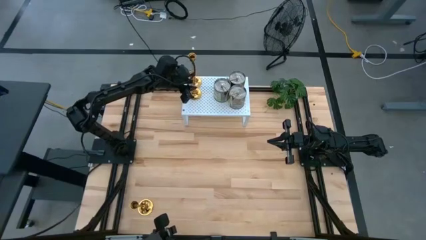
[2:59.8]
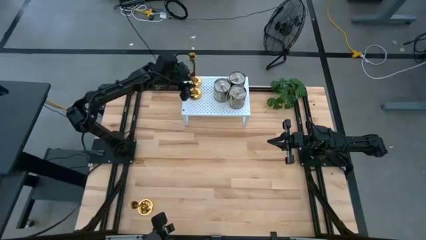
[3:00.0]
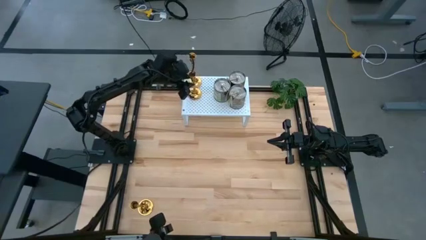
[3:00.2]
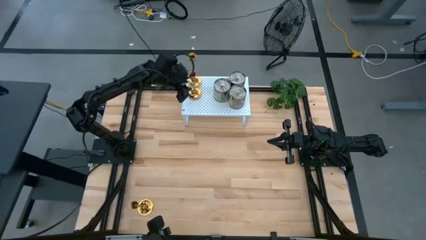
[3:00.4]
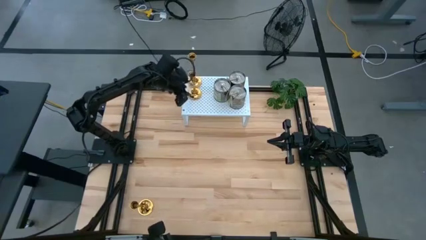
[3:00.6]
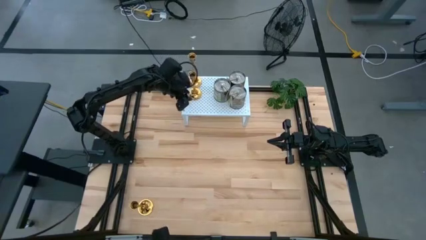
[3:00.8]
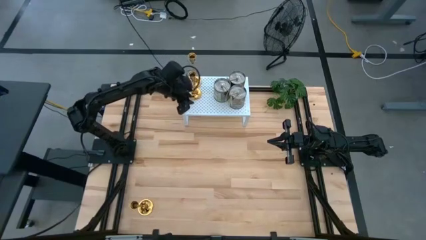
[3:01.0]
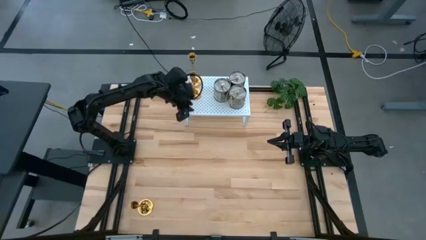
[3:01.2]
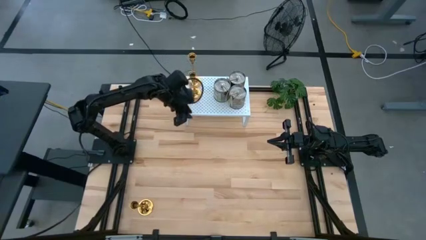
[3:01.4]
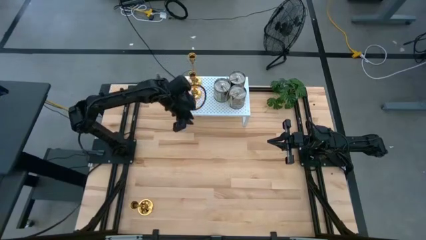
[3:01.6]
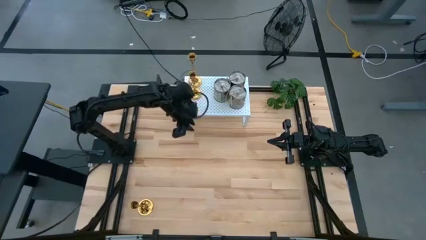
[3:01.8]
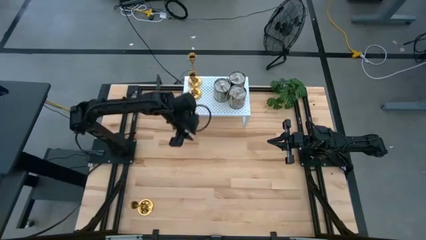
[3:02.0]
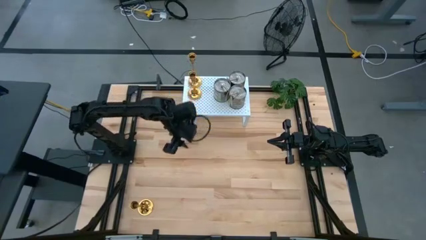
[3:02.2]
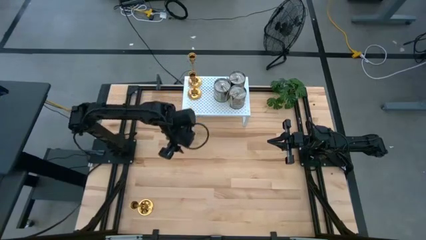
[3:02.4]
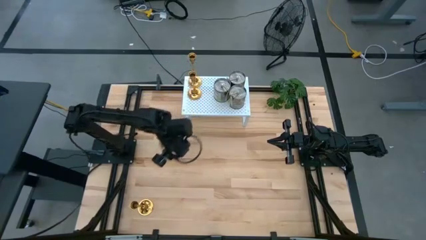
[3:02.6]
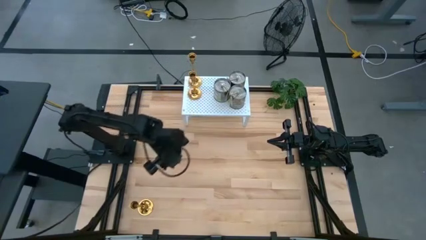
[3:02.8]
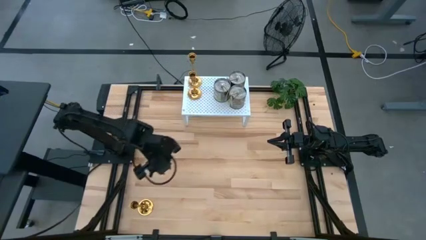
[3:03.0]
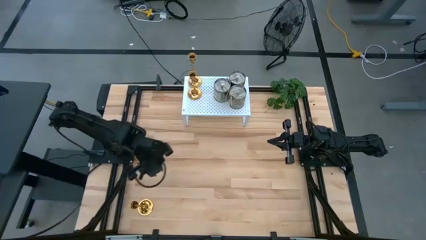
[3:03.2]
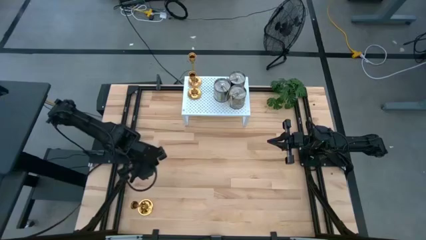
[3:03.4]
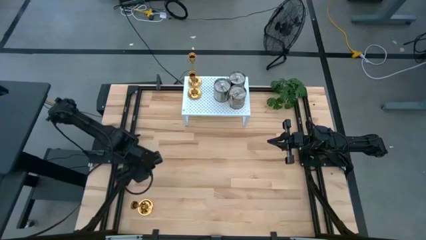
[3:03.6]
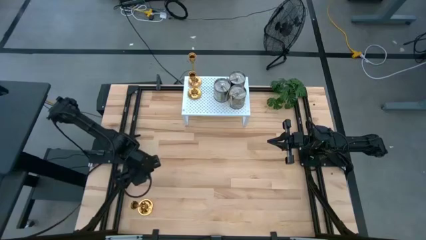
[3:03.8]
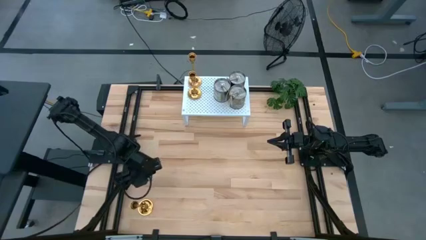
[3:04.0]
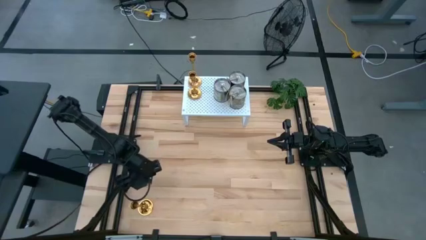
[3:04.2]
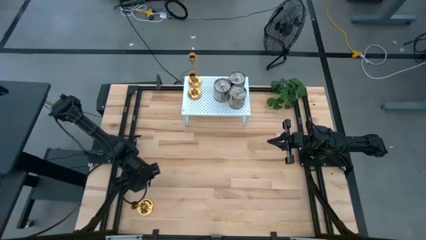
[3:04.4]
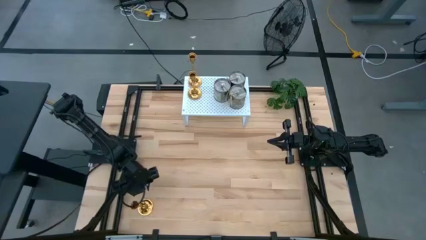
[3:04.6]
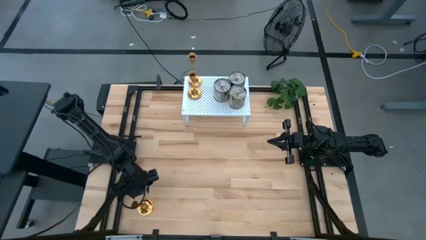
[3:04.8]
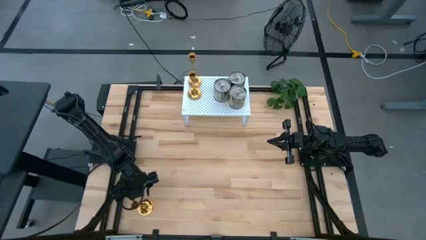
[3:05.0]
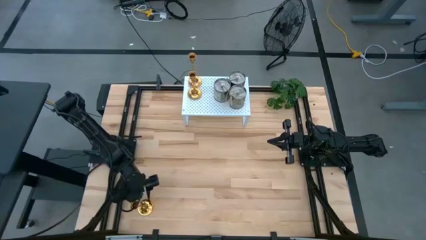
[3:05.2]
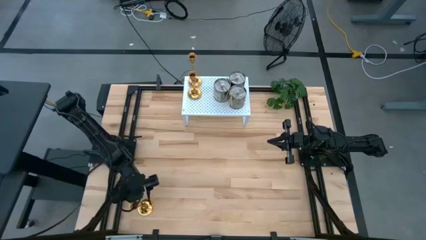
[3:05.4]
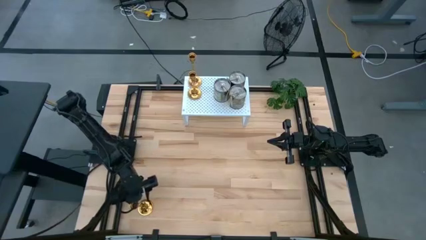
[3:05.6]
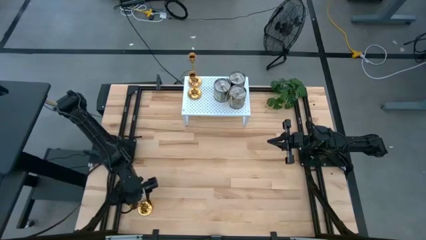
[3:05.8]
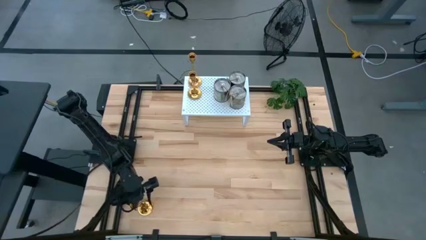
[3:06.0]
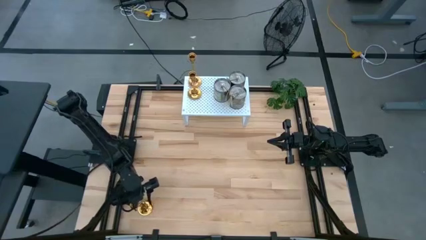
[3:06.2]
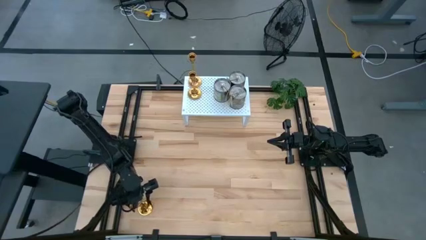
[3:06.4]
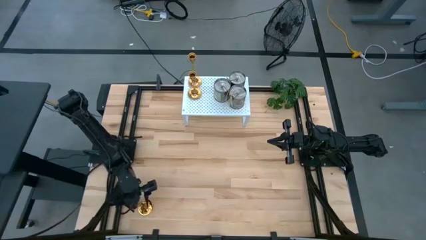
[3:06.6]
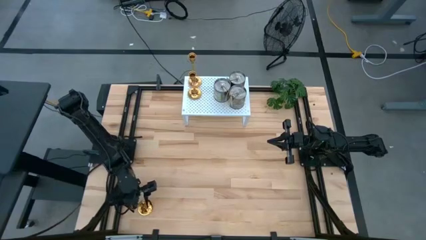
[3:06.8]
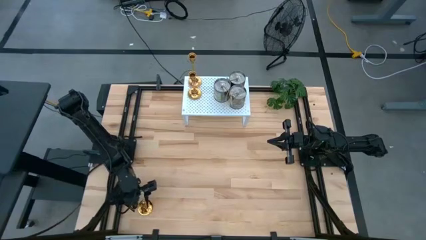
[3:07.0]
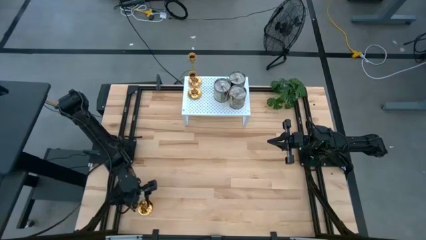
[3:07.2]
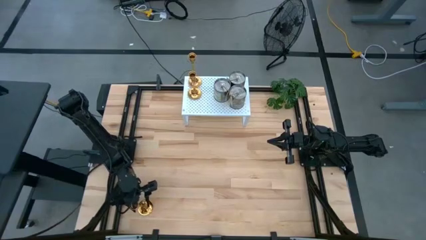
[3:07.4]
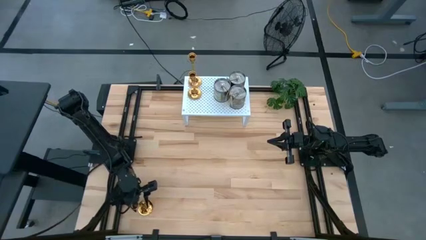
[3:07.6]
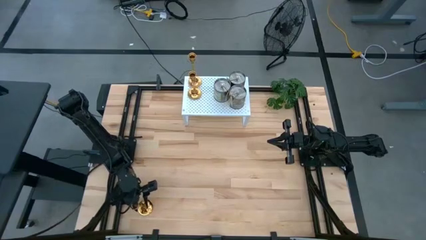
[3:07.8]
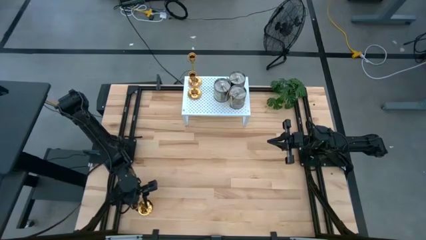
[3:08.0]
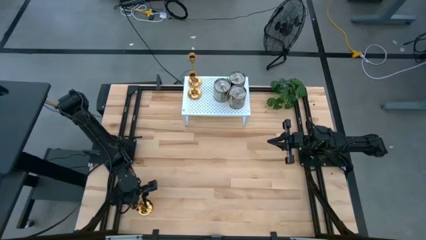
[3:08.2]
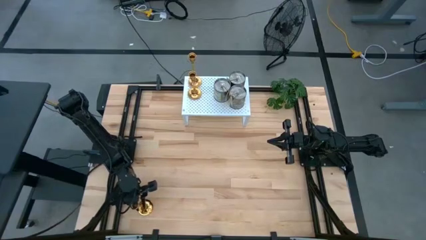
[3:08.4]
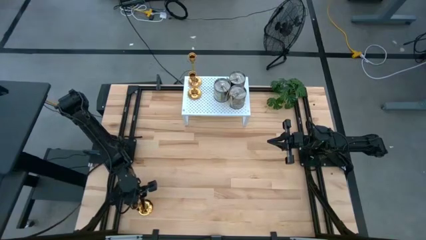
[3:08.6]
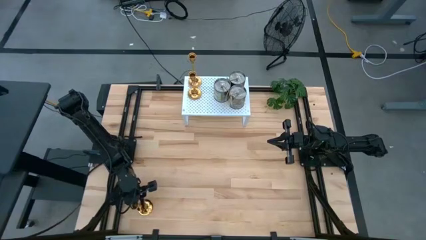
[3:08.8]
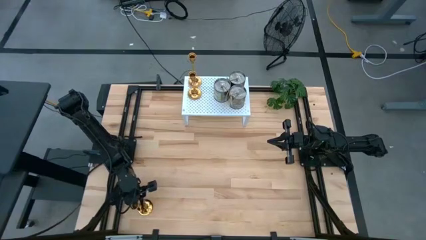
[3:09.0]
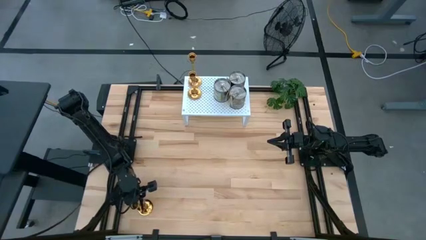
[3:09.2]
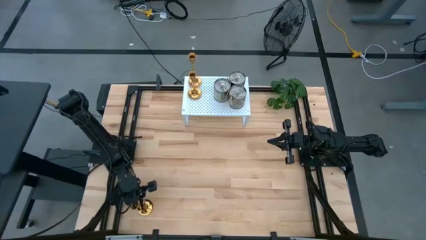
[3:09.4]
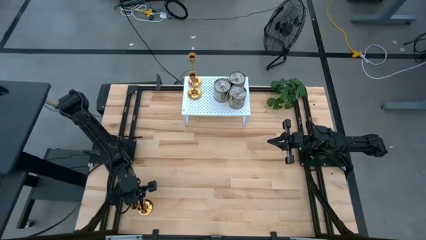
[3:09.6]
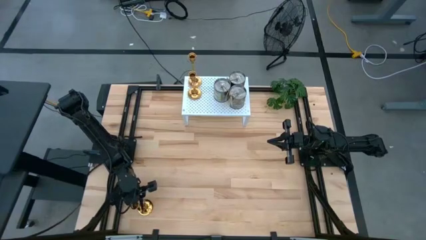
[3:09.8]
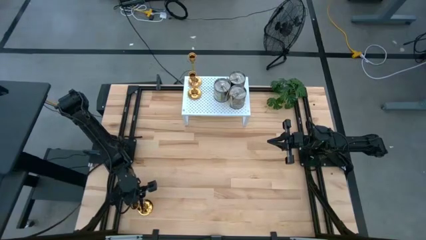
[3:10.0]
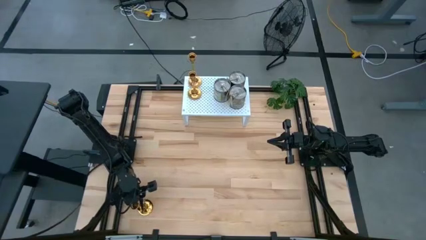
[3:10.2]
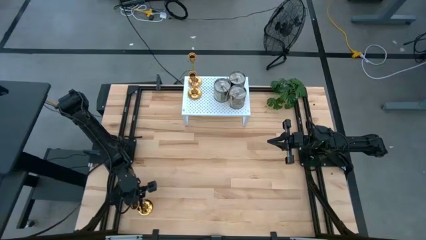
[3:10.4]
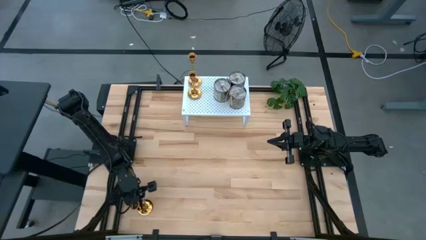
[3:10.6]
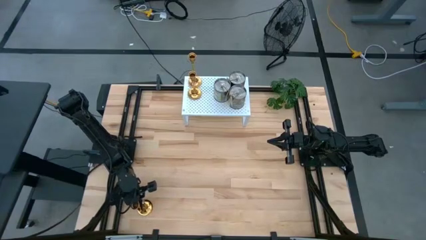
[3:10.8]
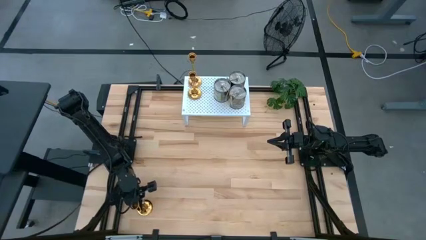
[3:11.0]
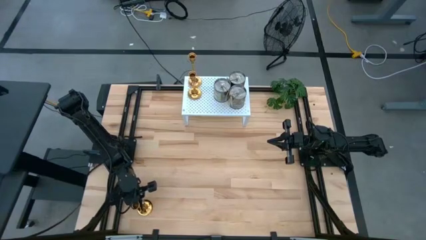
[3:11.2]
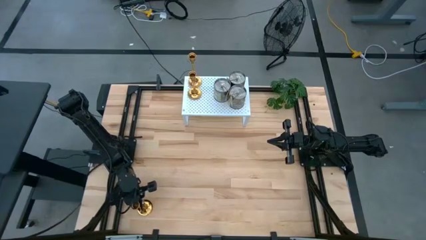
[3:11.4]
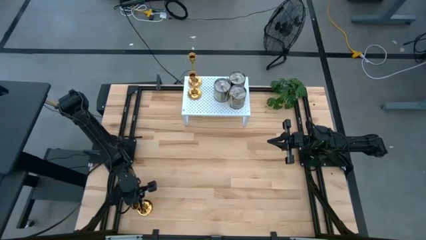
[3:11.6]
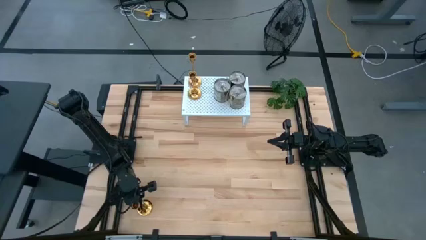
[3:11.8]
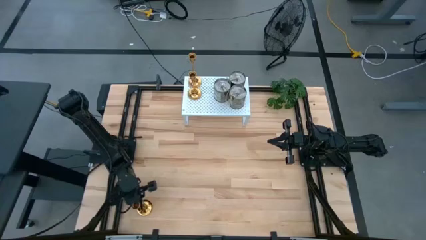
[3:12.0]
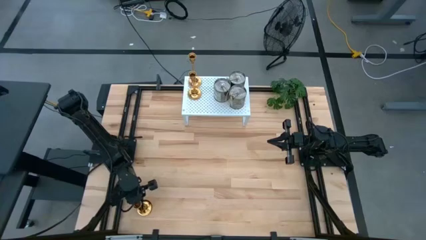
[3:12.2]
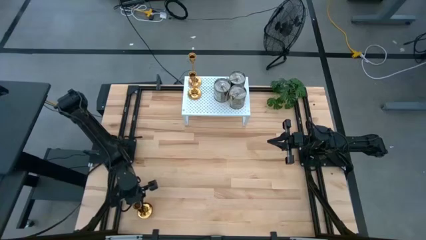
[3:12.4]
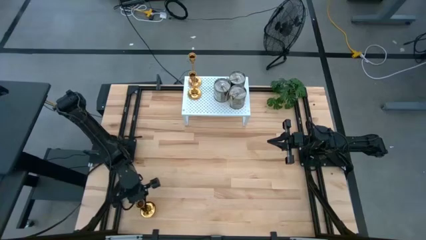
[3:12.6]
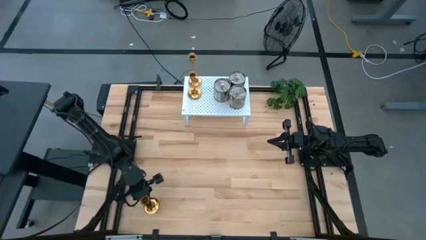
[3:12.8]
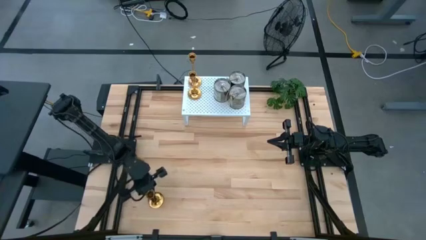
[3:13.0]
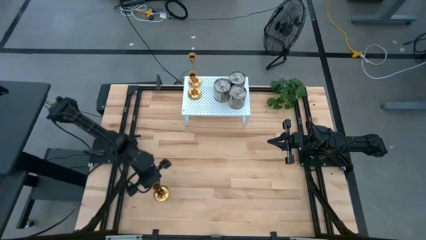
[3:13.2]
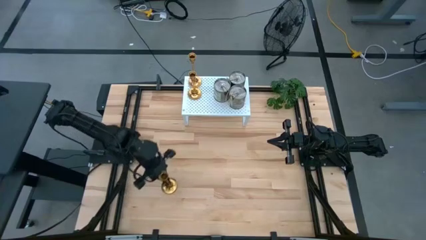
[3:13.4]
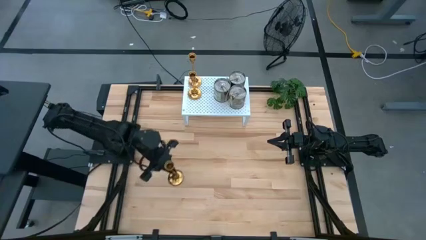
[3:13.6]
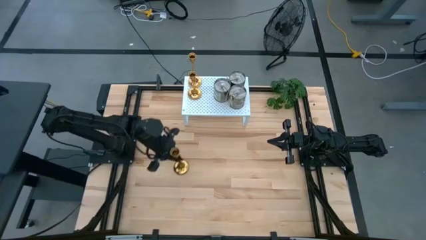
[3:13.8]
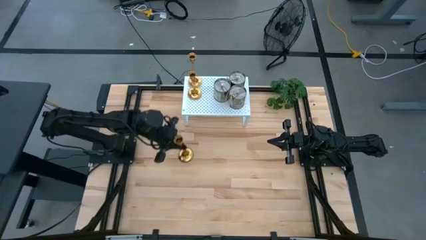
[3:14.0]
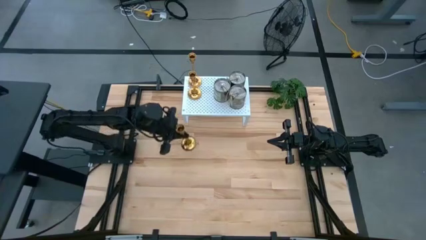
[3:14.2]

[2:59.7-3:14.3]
Task: Pick & Place candle stick holders
Put the candle holder aligned with the other candle holder on the shelf
